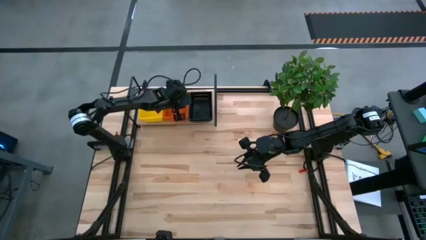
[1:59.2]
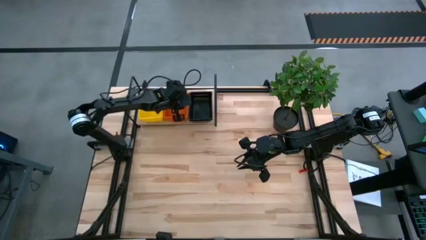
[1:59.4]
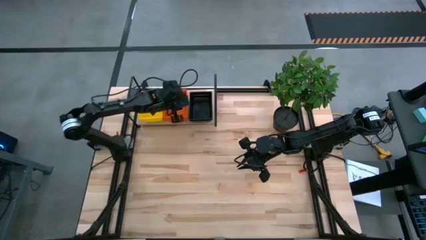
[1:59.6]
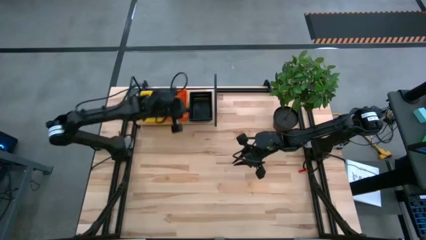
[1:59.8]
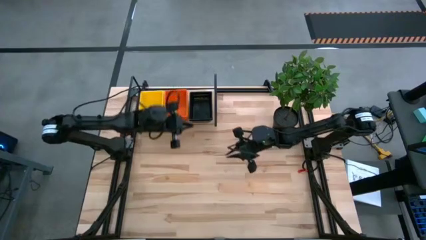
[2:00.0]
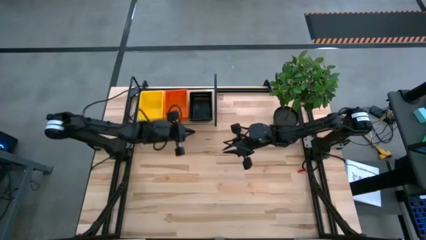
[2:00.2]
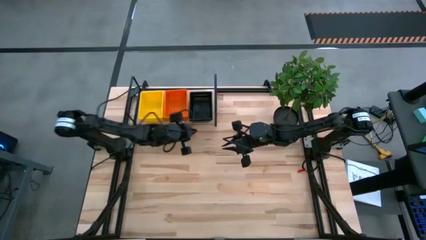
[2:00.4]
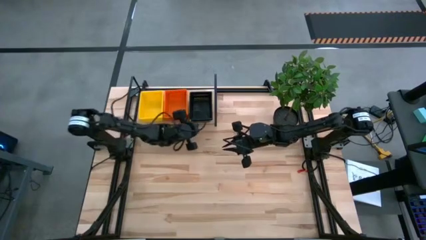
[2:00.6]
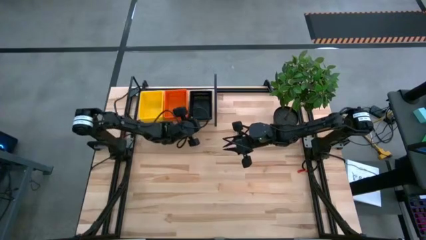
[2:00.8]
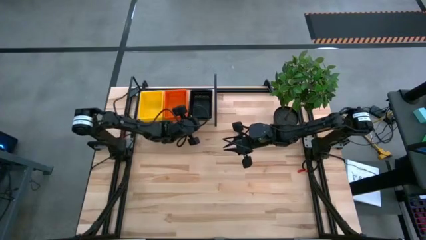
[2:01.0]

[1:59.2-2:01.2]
Task: Stack baskets on shelf by color
Adjust the black bins on the shelf

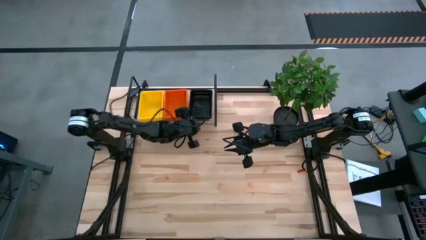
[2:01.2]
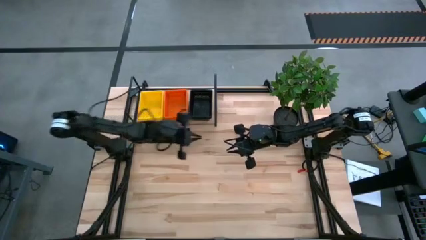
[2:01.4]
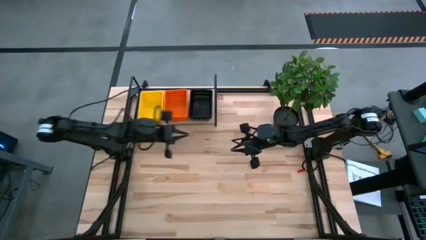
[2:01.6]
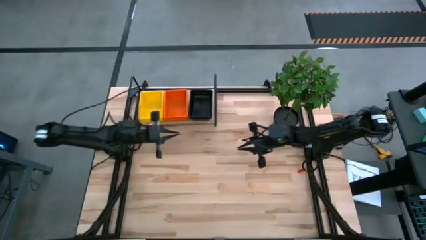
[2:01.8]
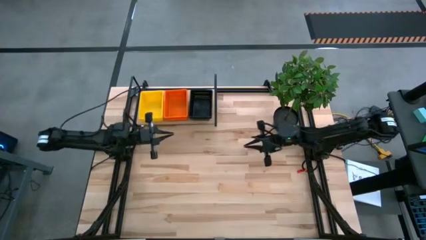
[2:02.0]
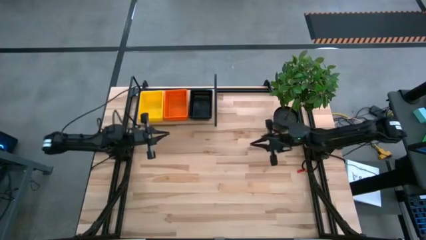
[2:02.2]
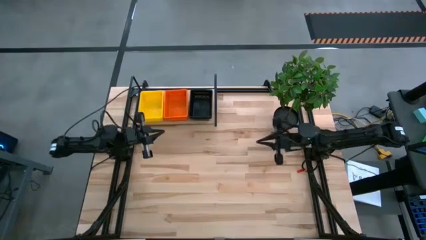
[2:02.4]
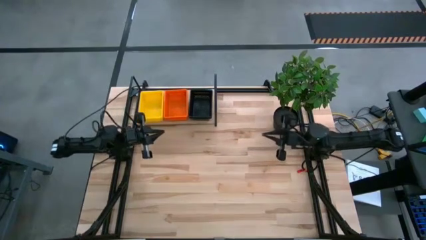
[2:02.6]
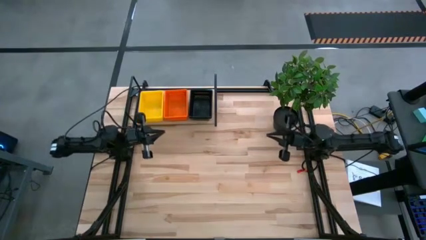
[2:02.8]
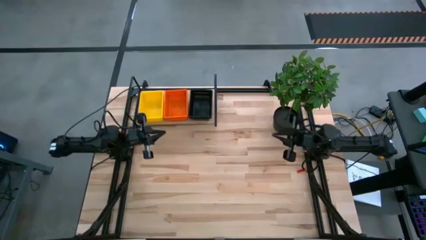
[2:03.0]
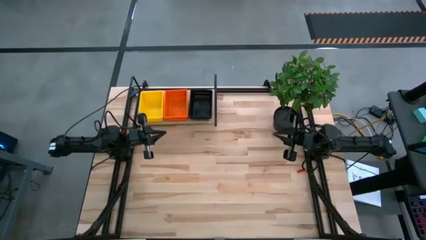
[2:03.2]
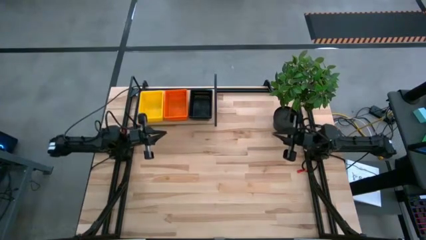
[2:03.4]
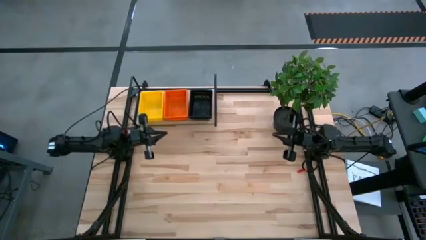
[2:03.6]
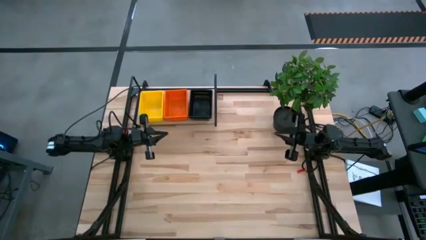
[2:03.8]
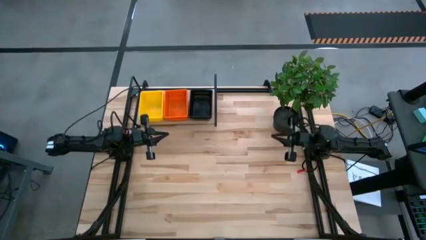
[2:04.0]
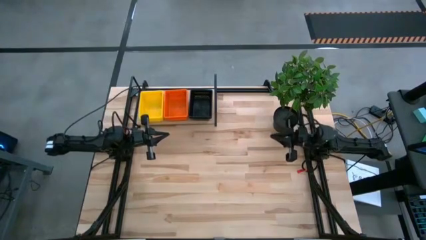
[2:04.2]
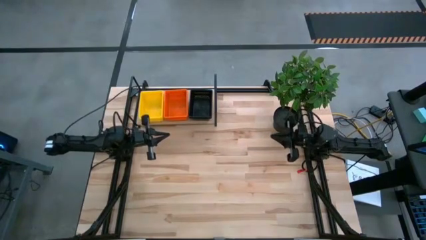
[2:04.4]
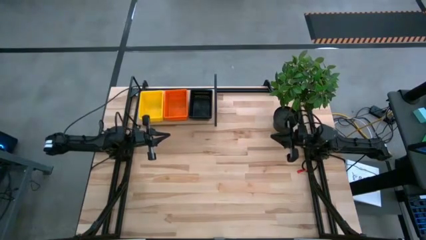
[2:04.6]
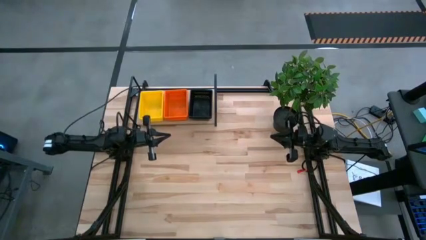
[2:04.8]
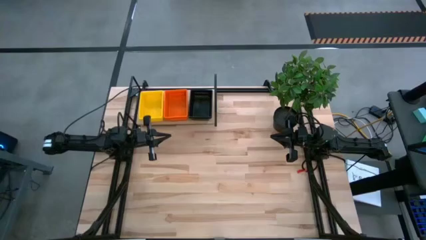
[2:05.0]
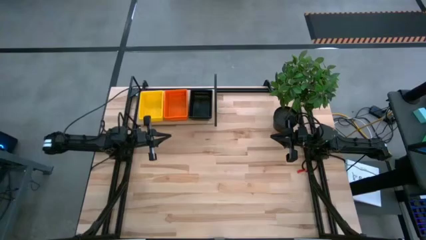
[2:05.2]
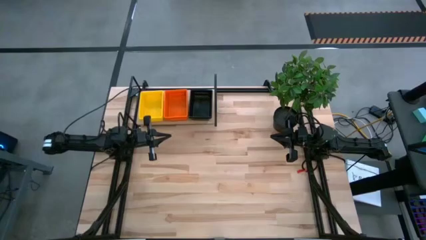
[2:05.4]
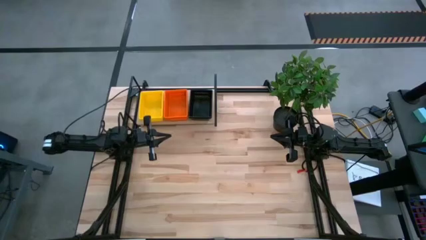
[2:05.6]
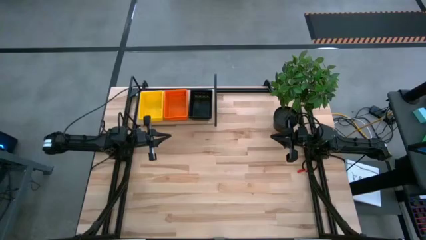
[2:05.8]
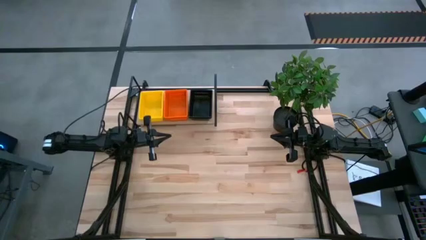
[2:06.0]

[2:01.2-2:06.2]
Return to Home Position

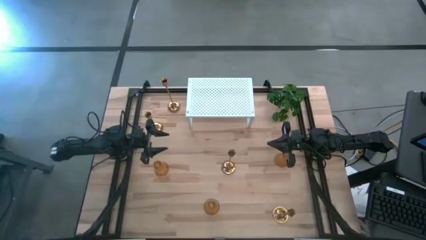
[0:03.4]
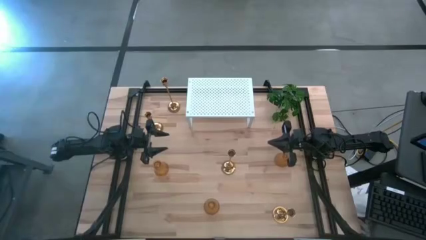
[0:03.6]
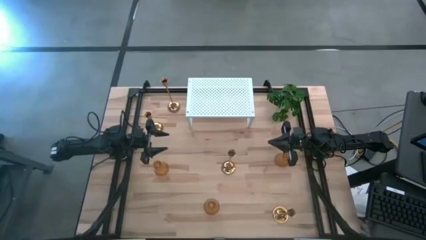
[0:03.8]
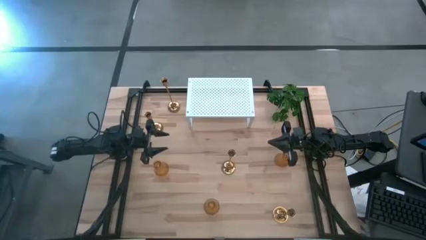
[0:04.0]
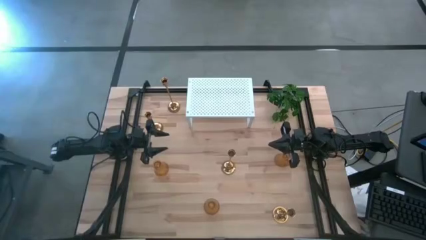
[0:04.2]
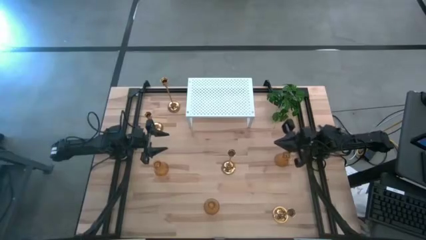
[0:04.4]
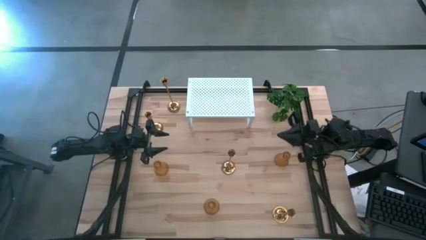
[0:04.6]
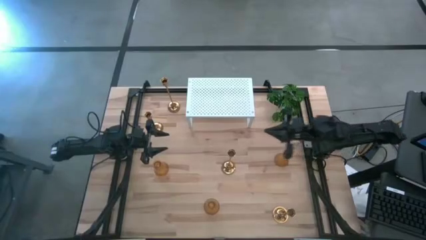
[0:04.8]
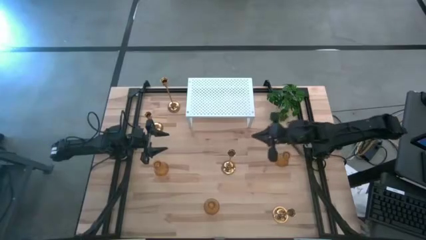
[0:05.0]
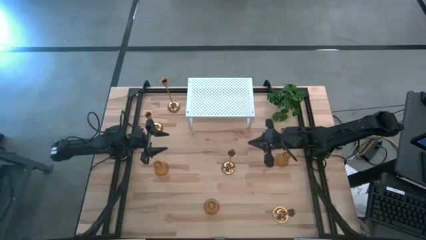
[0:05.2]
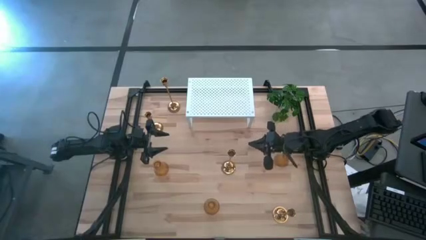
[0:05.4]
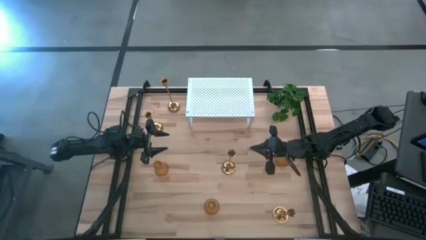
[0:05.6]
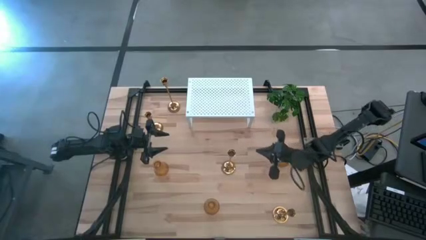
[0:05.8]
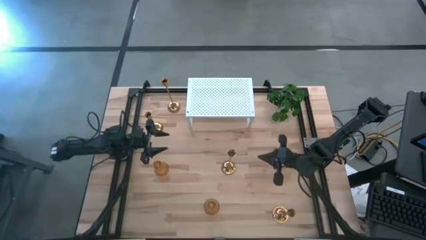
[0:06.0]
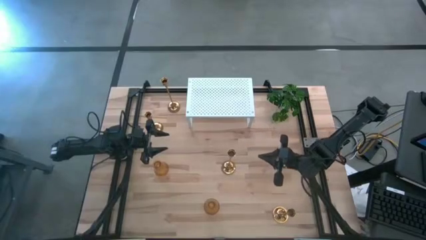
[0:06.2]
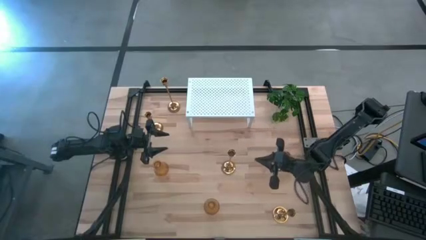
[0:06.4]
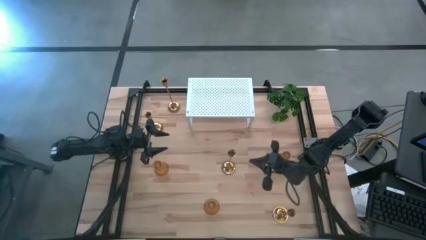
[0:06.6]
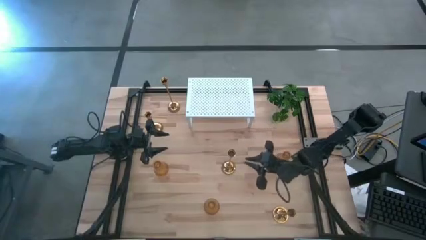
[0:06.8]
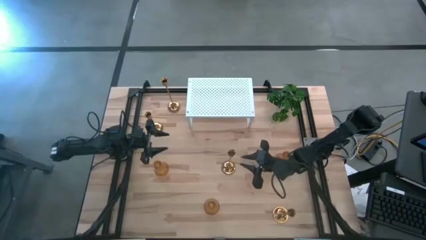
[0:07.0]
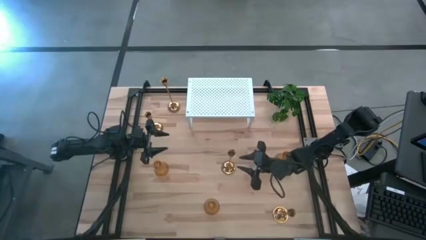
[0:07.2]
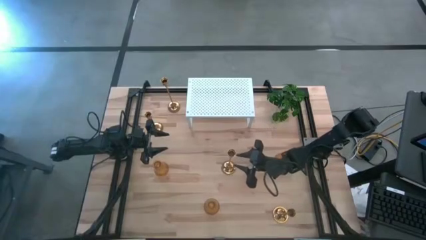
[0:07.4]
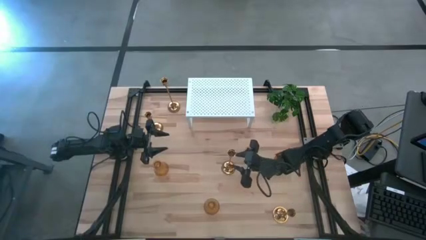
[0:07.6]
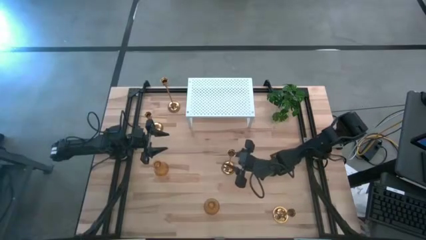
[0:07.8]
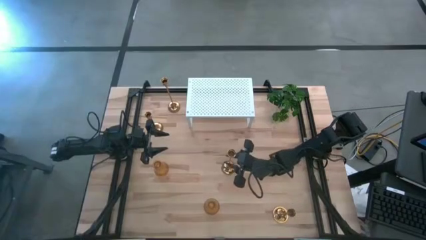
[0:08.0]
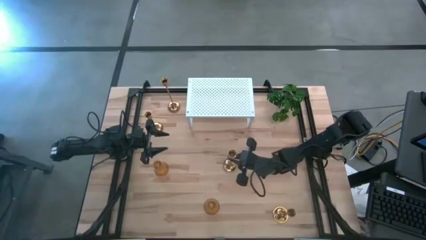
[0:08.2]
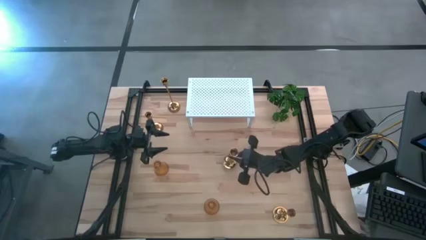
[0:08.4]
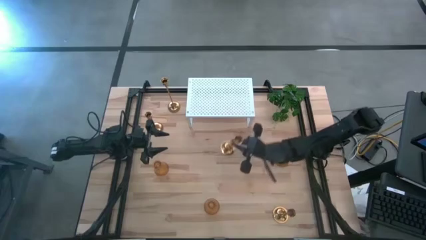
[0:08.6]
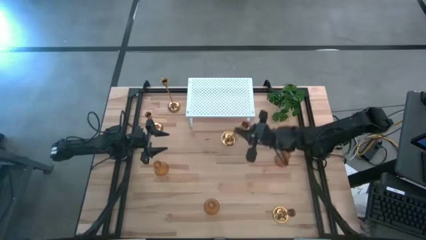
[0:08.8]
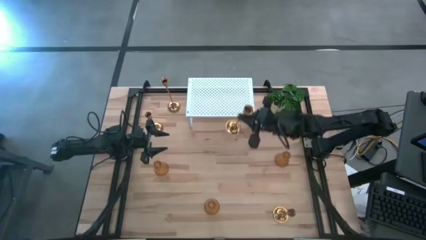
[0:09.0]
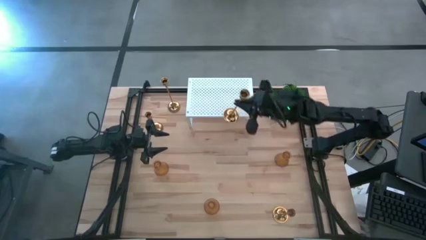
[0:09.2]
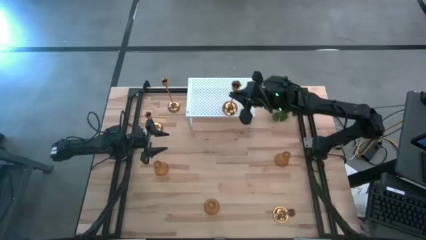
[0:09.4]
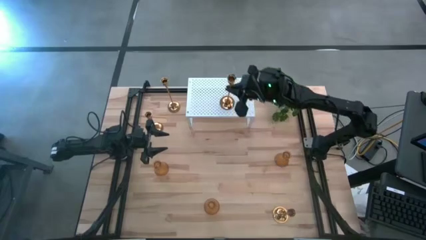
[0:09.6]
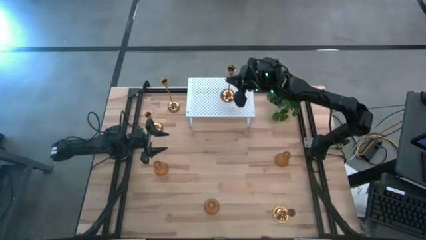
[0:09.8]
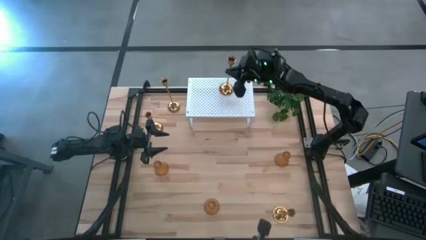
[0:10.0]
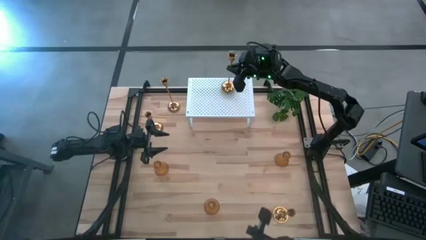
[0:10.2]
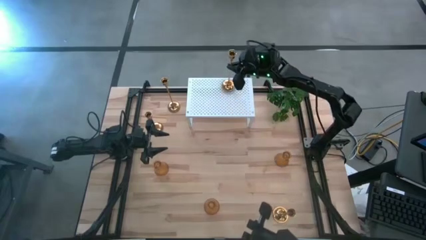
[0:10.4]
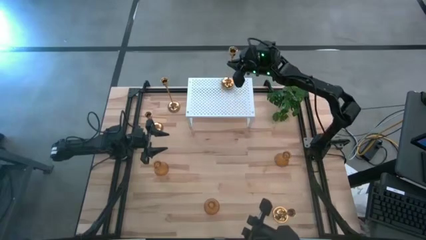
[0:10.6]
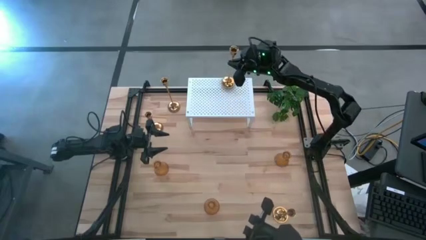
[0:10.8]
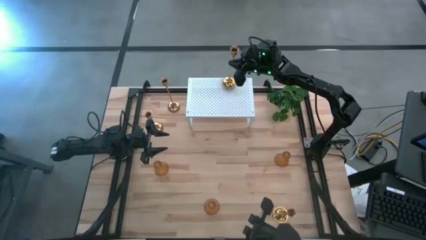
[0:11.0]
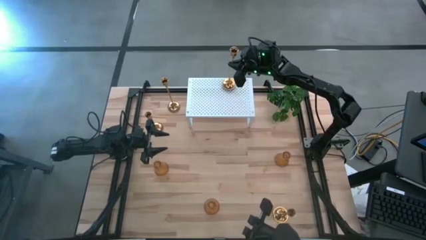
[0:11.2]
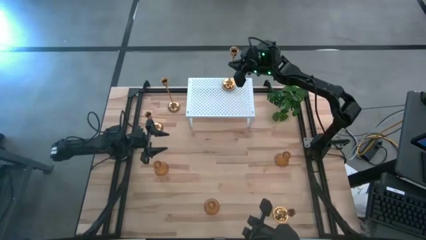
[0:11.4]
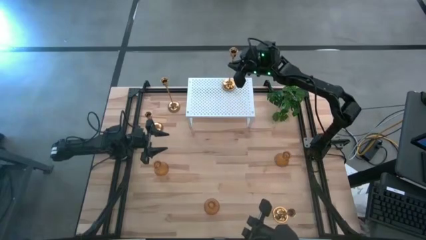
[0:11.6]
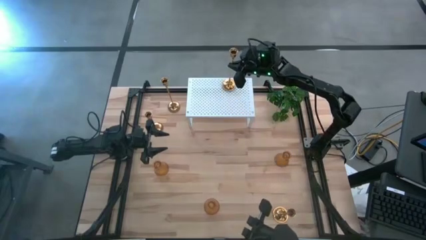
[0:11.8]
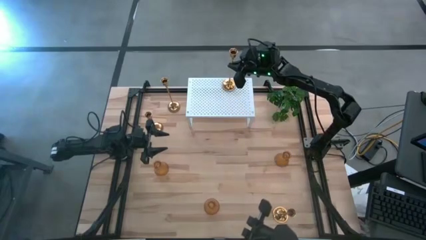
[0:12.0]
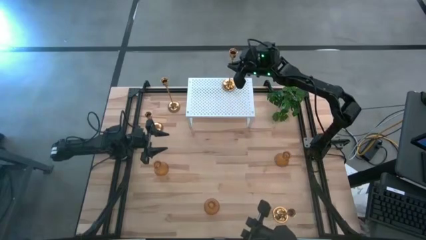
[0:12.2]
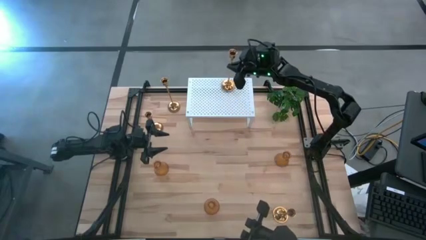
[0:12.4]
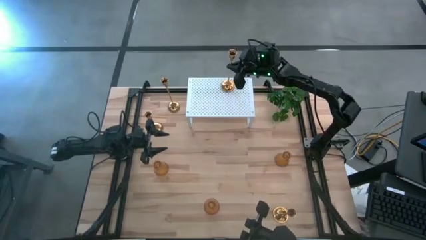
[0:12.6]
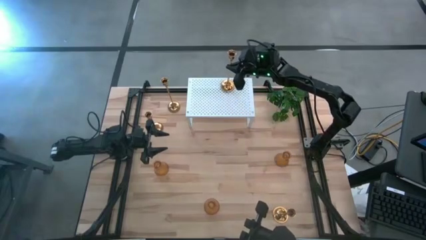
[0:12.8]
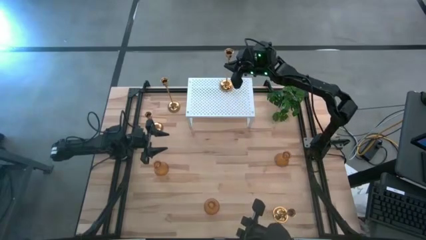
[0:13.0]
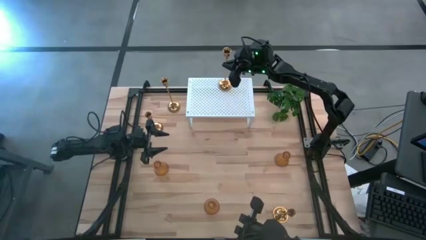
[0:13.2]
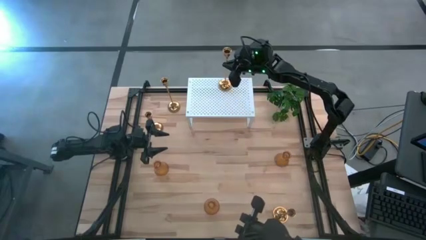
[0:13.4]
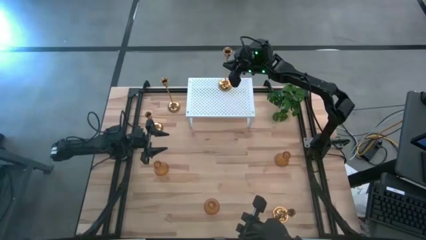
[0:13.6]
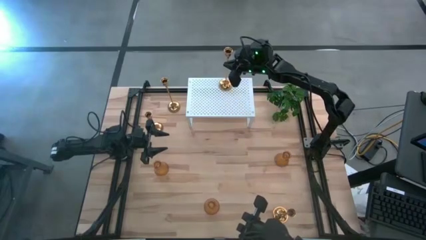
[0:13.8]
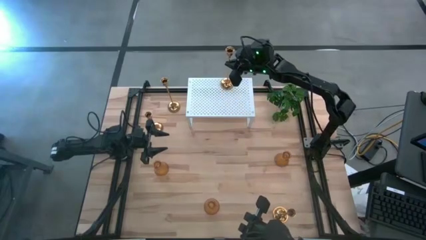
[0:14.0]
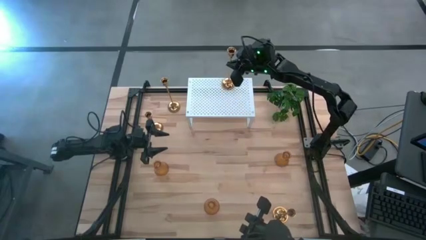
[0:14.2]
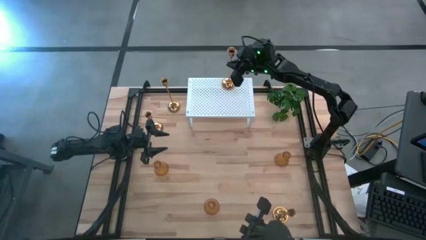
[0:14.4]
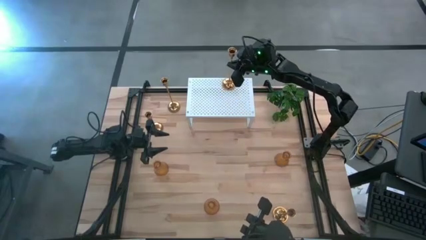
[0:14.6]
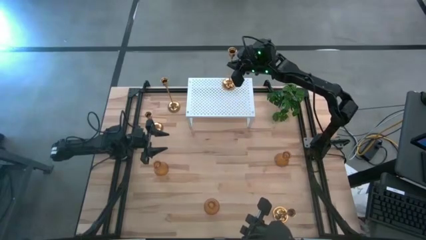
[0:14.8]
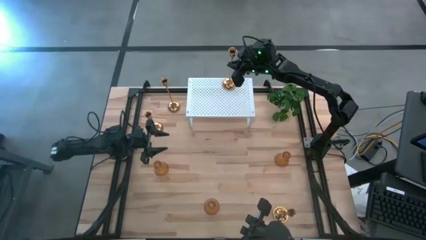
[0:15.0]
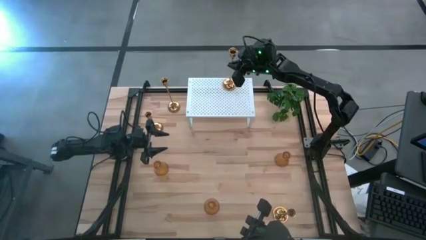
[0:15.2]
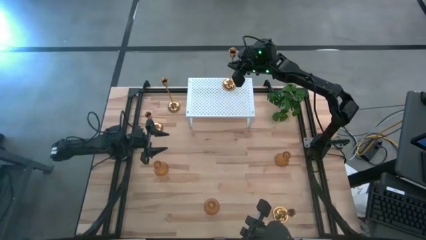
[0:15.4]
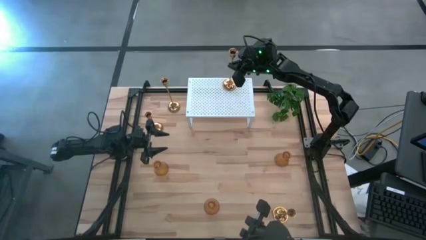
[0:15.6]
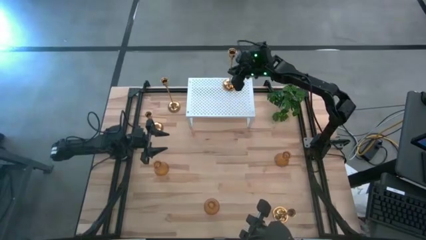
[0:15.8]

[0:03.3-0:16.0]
Task: Pick & Place candle stick holders
Put the large golden candle holder on the shelf
